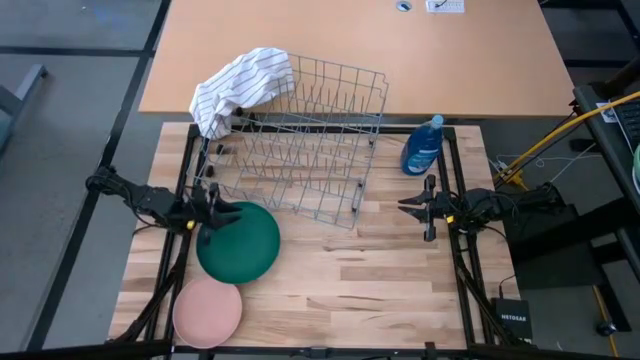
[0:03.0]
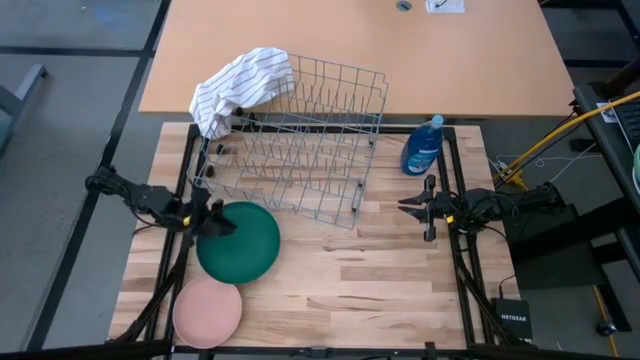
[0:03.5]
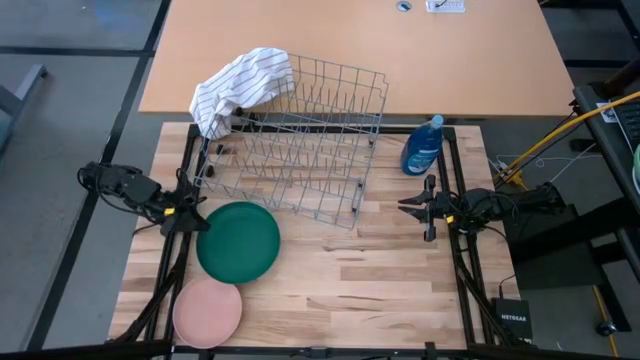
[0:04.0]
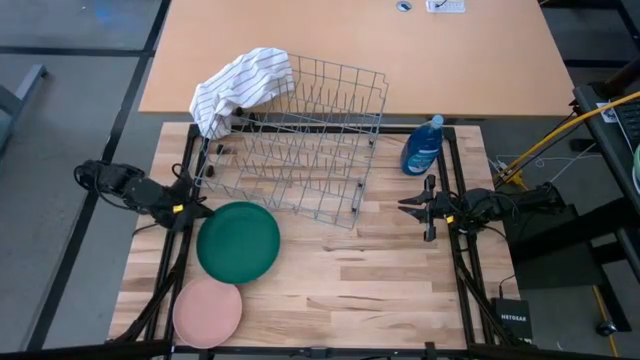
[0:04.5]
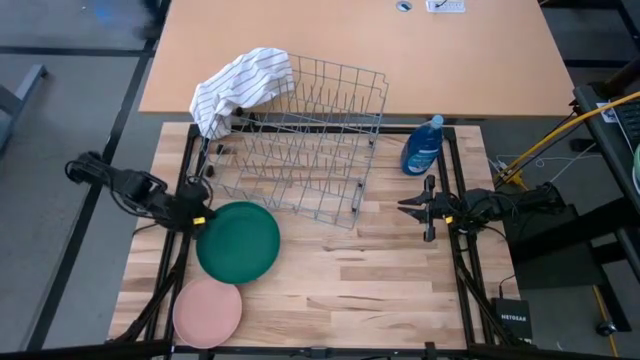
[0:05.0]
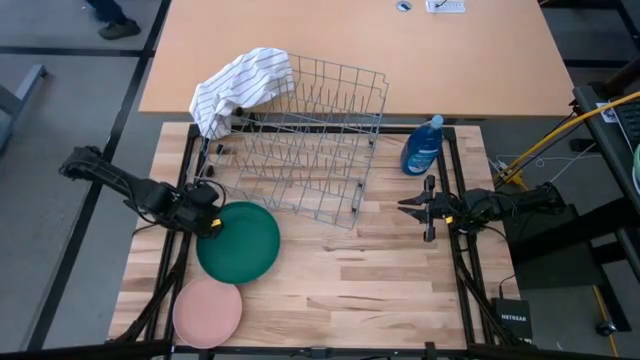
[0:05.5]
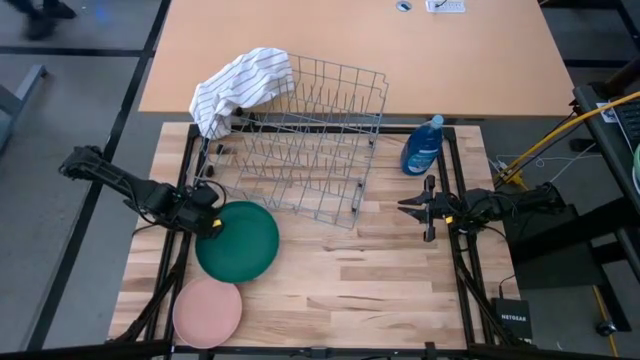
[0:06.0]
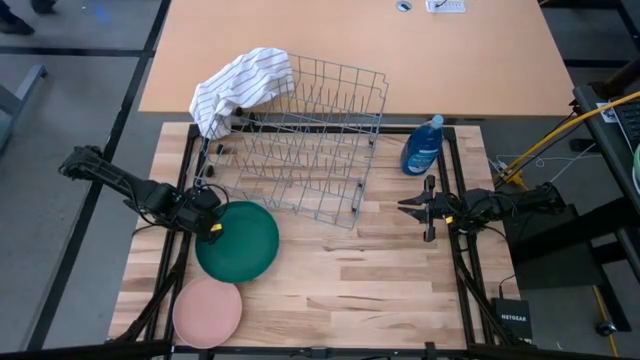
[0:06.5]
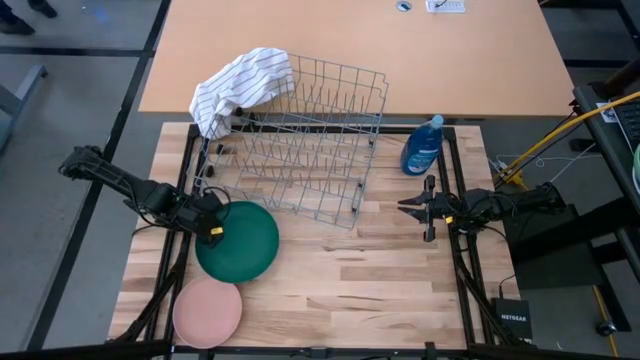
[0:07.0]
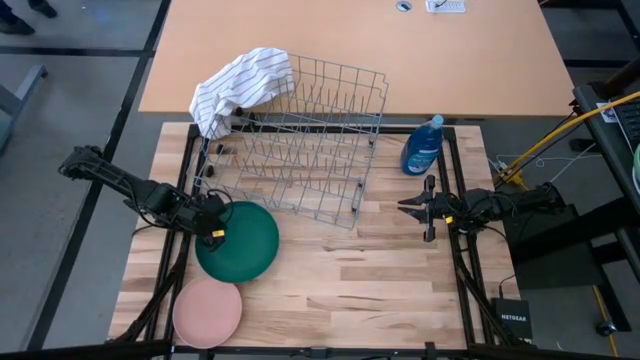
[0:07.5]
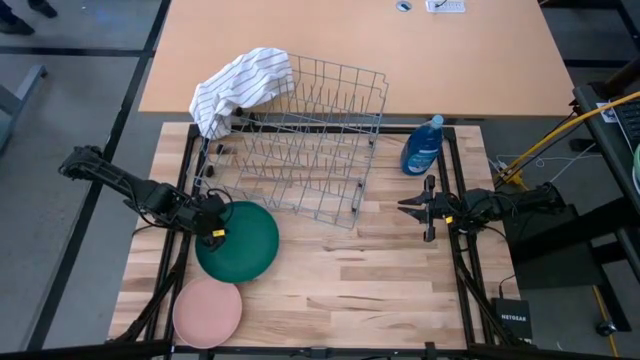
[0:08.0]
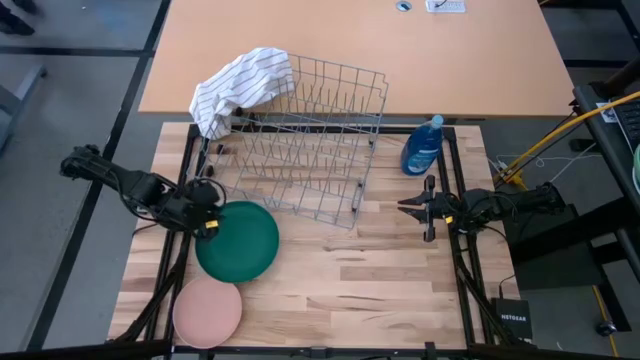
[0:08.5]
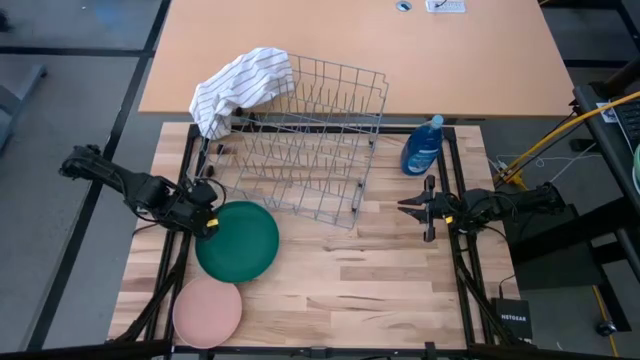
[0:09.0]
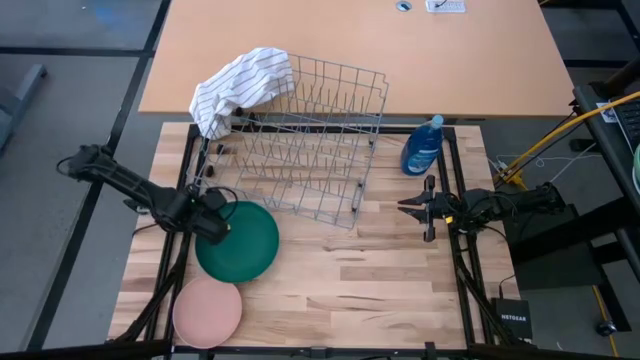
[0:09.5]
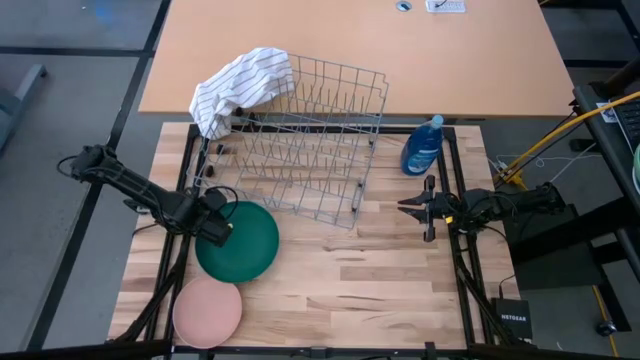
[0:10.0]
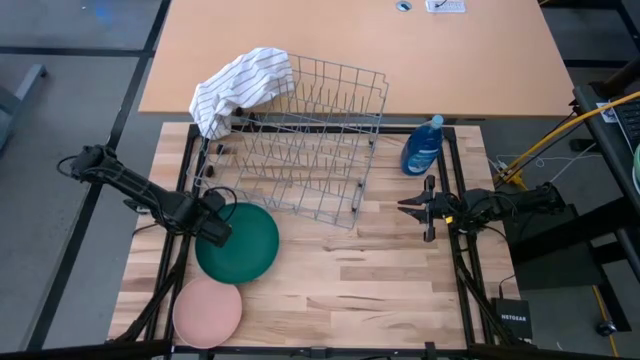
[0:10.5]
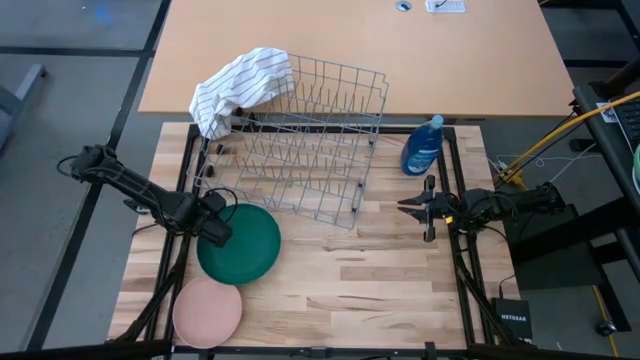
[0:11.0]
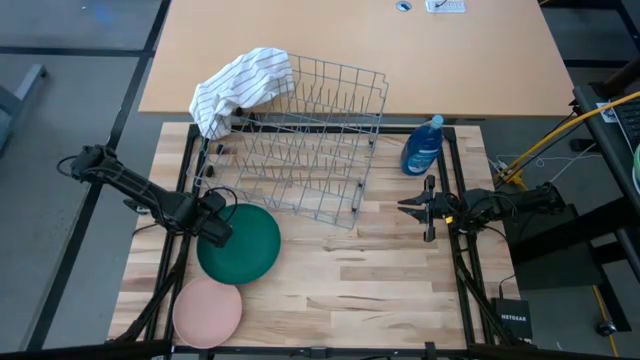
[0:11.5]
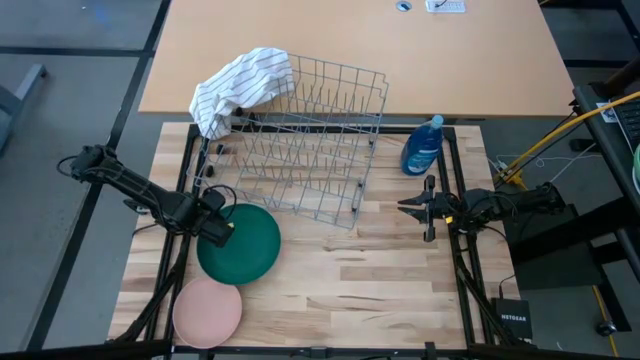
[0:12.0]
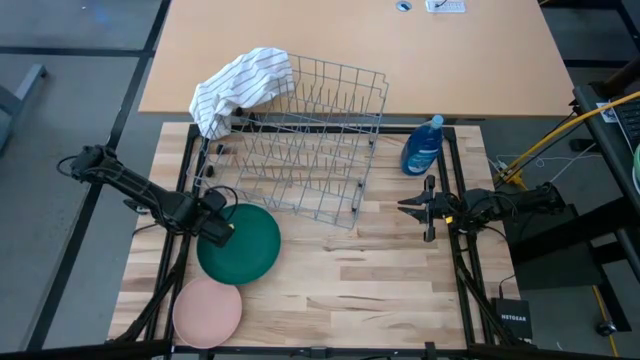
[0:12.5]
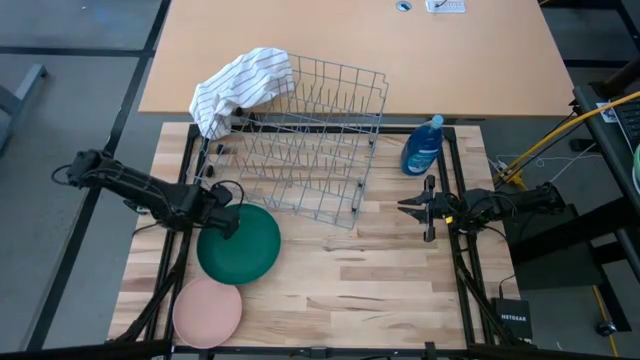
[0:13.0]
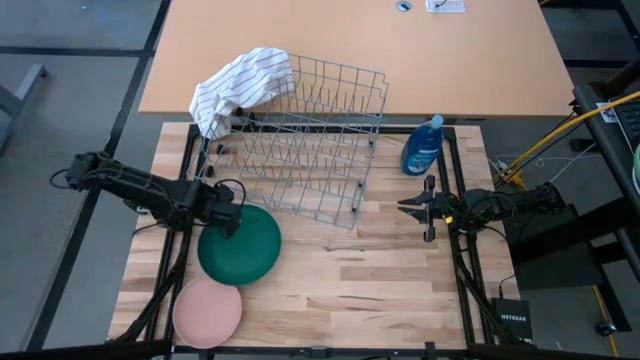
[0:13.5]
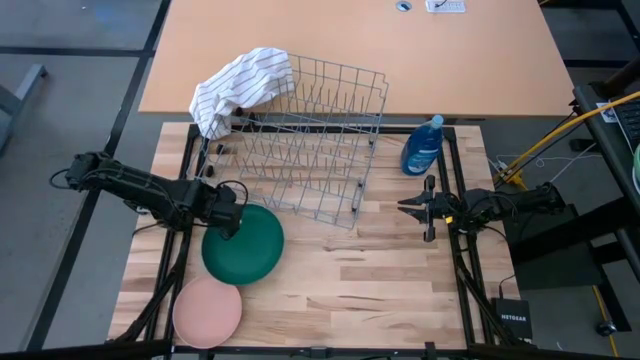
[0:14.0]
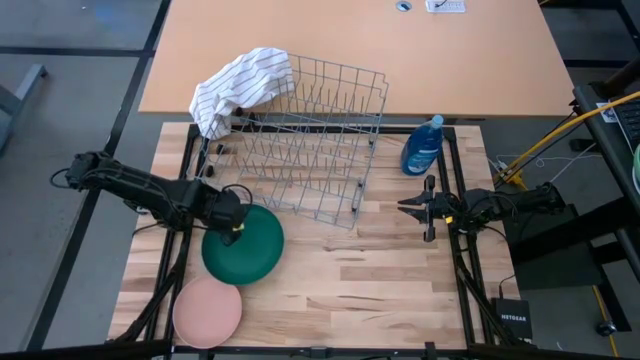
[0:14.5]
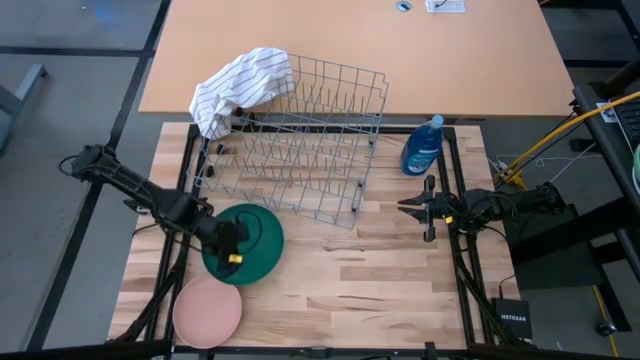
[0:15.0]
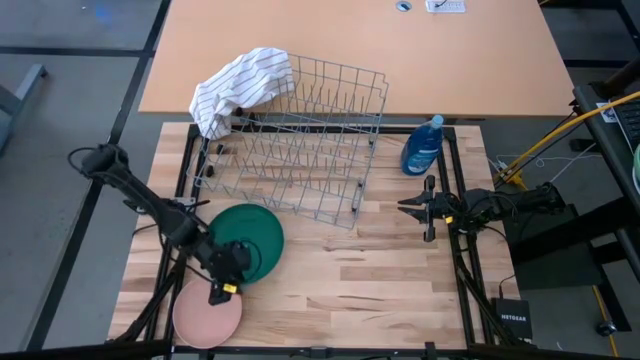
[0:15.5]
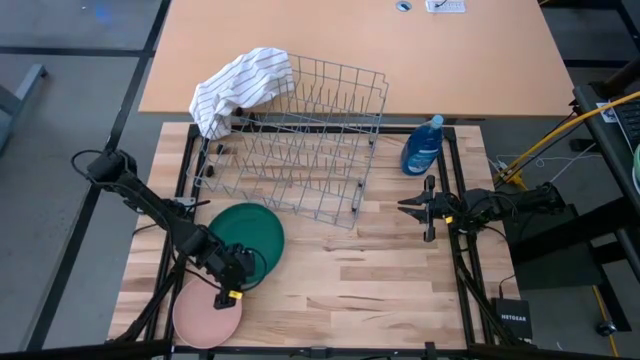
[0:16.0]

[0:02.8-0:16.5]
Task: Sort dishes
Put the green plate into the dish rack

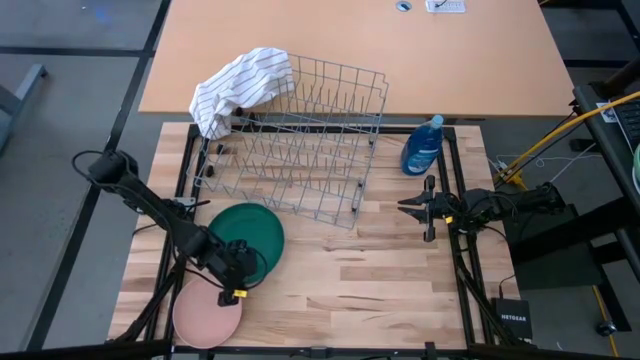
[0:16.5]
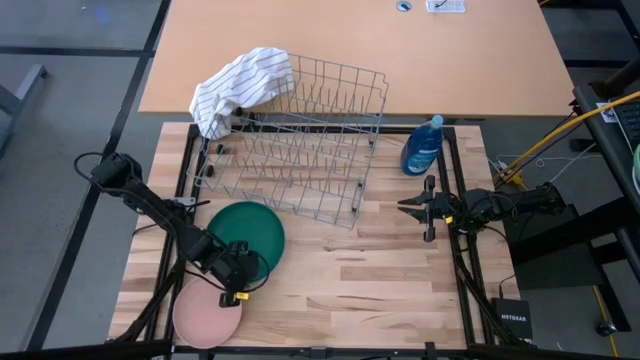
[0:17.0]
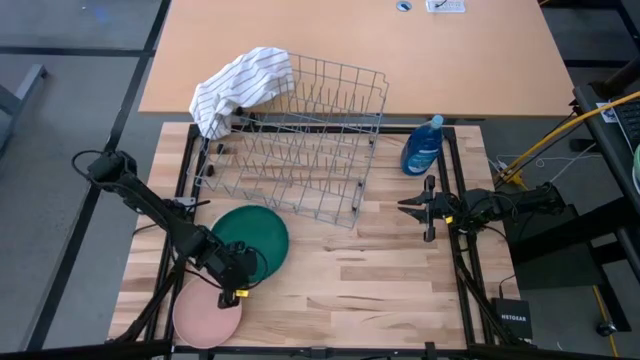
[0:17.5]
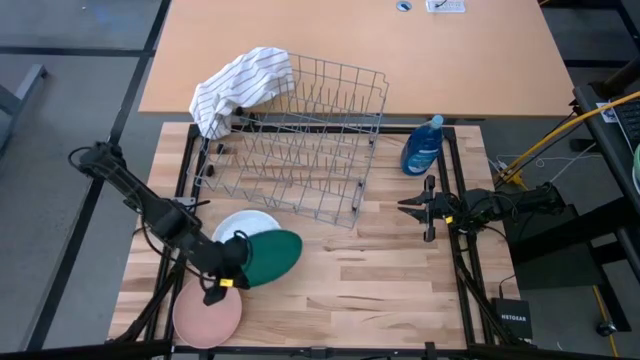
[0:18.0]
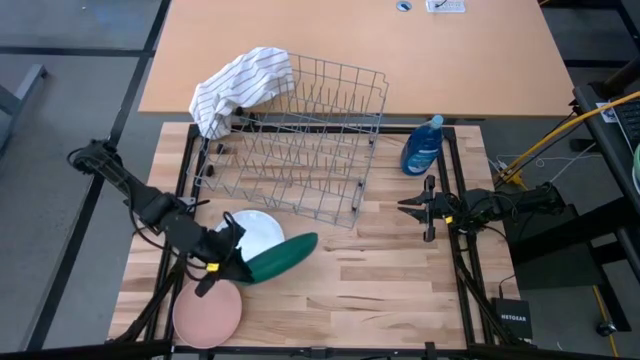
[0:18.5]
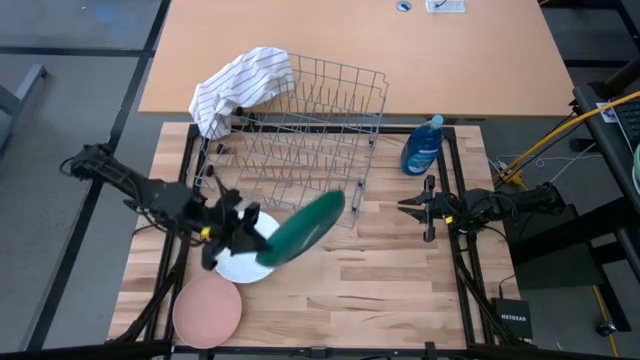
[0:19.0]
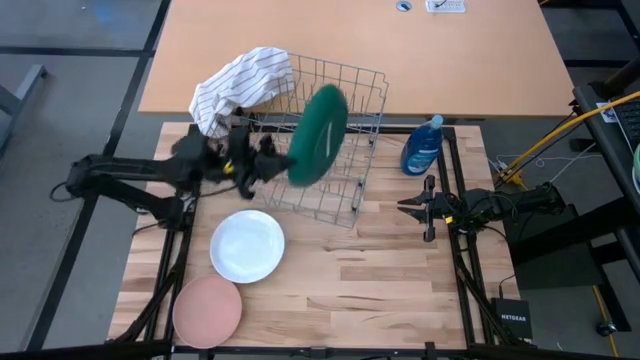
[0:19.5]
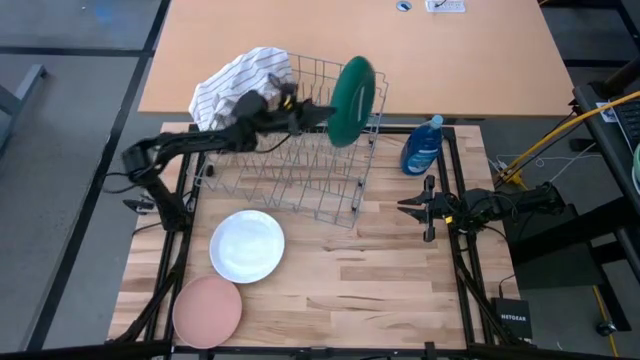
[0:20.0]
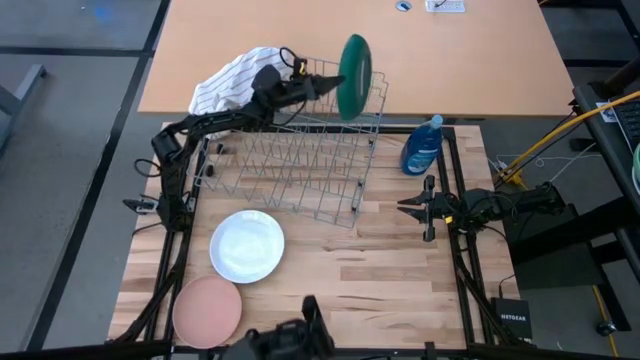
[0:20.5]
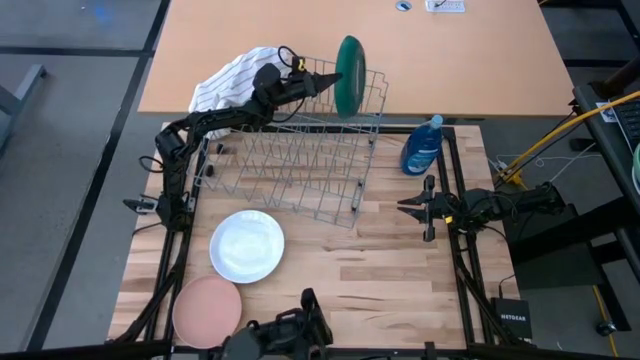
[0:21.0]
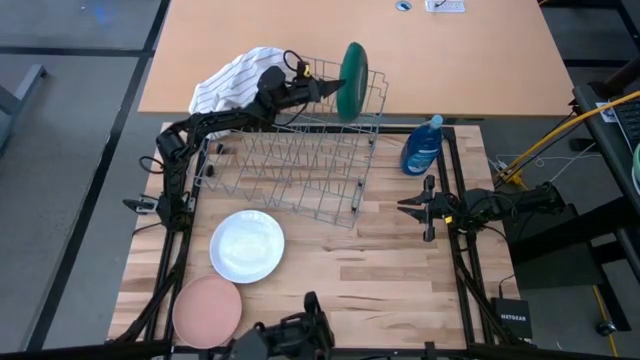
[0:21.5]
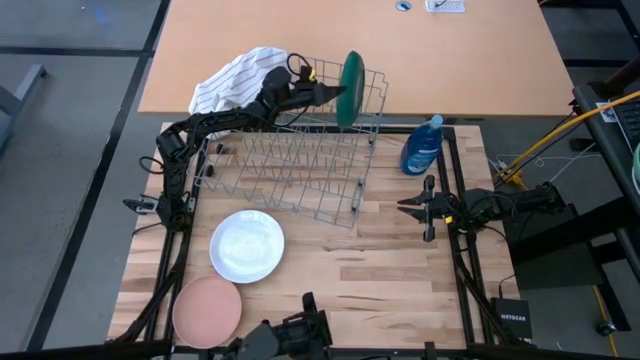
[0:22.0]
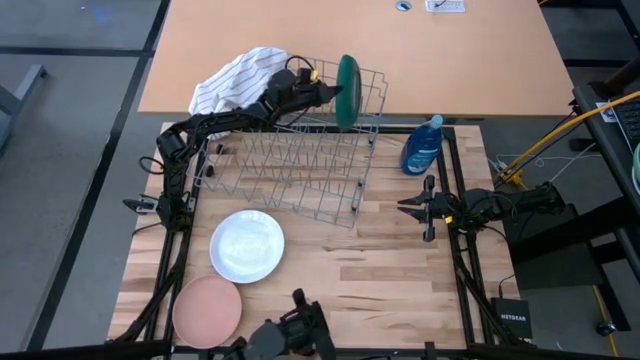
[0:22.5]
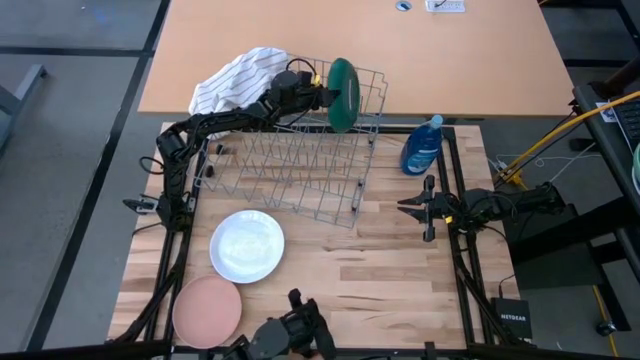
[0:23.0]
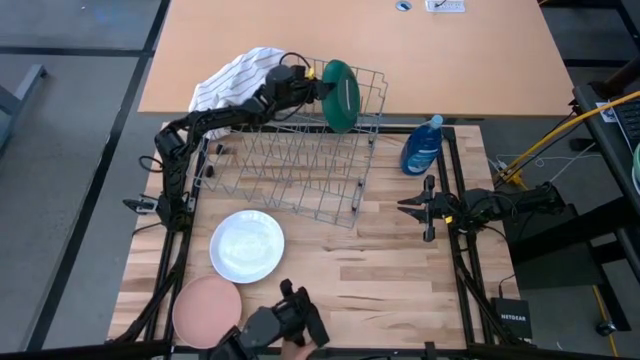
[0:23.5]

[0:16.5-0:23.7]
Put the green plate into the dish rack

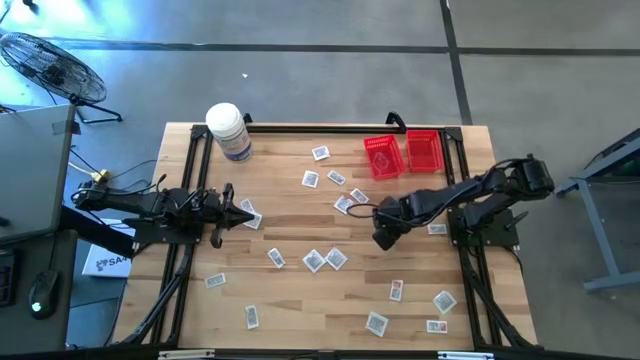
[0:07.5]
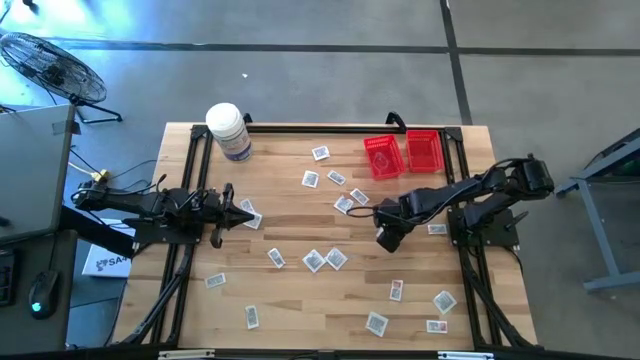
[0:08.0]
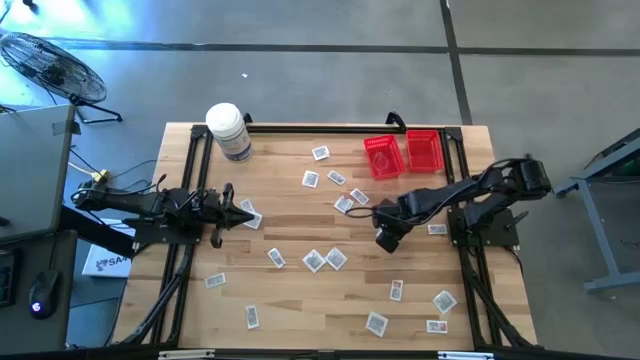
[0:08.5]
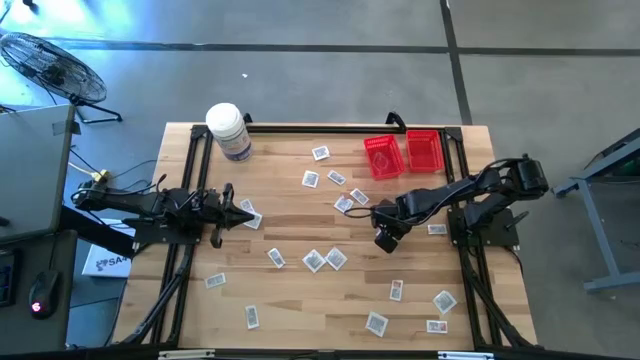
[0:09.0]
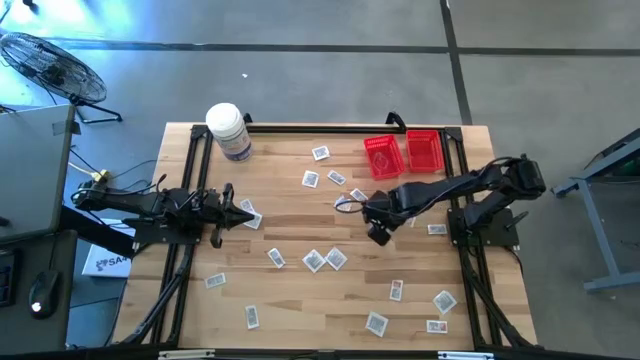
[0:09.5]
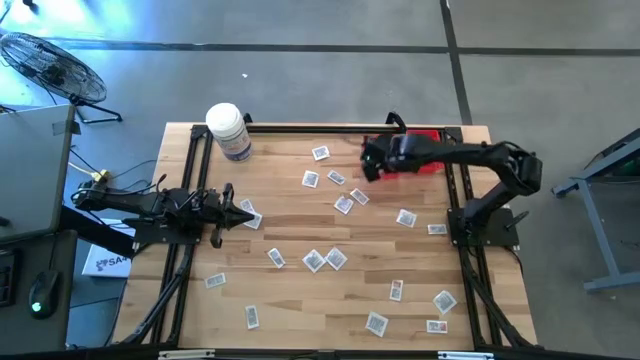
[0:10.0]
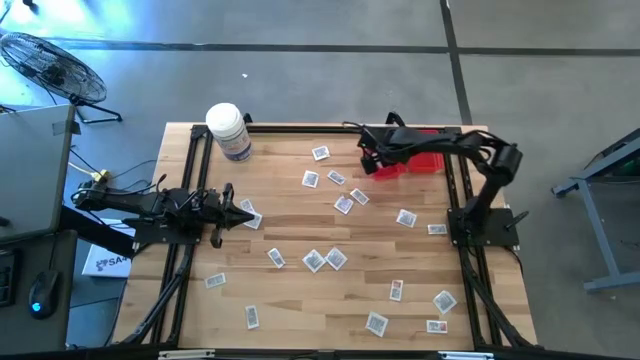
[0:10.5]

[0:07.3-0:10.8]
Task: Pick & Place First Aid Supplies
Put the towelette pack into the left red bin
